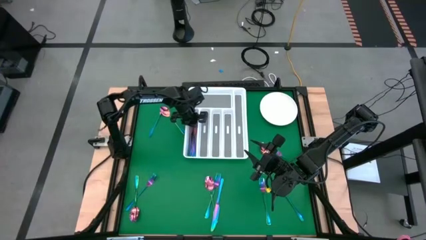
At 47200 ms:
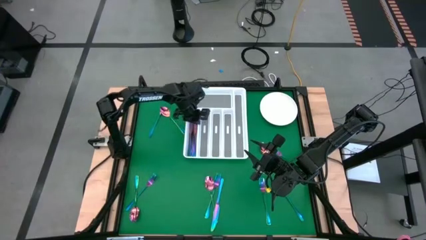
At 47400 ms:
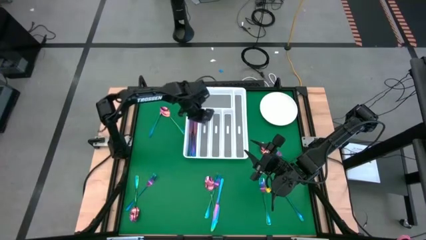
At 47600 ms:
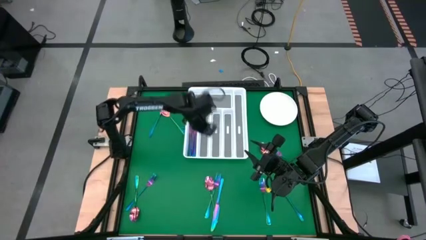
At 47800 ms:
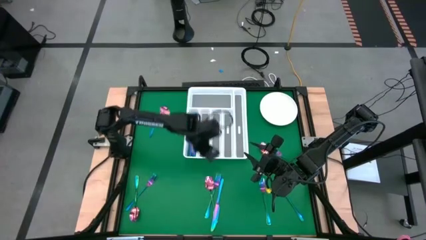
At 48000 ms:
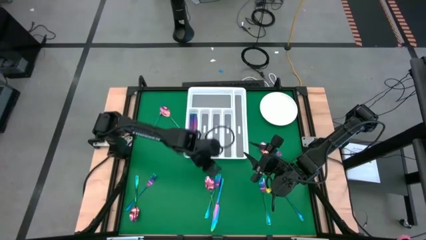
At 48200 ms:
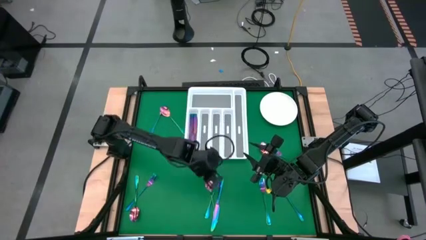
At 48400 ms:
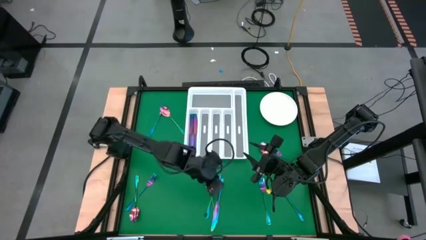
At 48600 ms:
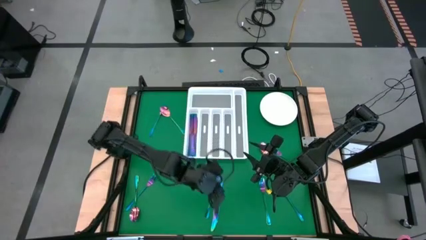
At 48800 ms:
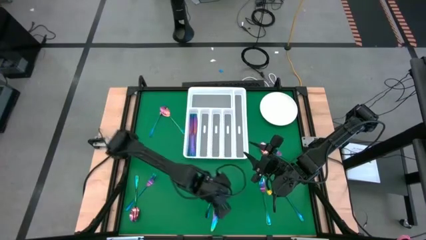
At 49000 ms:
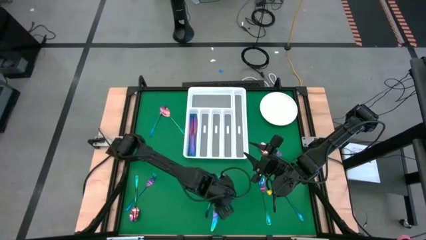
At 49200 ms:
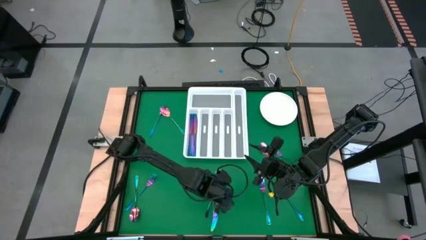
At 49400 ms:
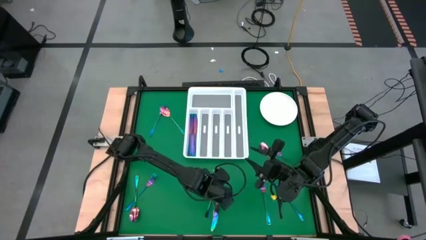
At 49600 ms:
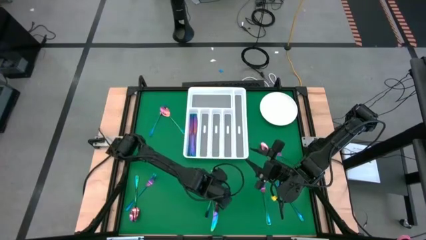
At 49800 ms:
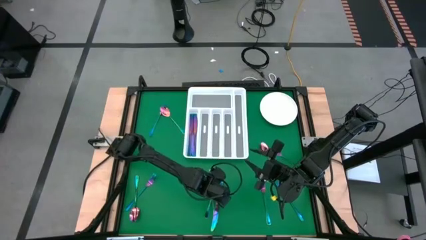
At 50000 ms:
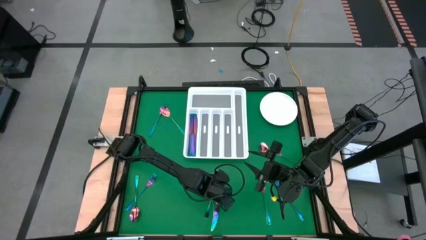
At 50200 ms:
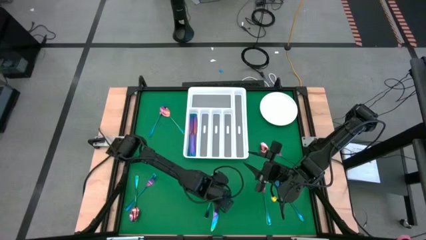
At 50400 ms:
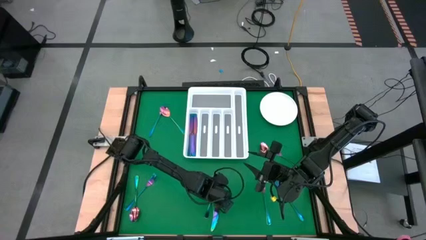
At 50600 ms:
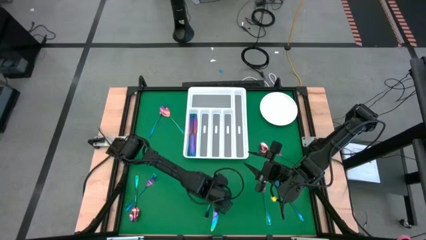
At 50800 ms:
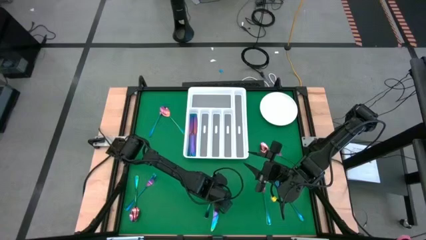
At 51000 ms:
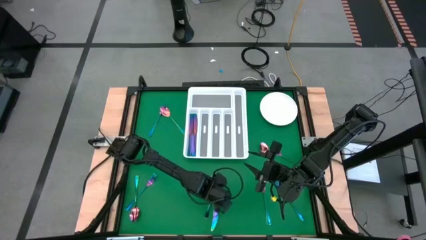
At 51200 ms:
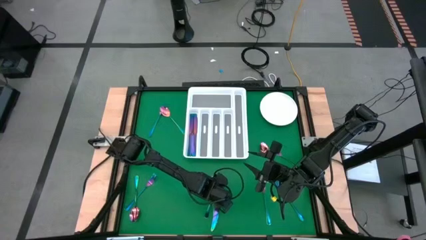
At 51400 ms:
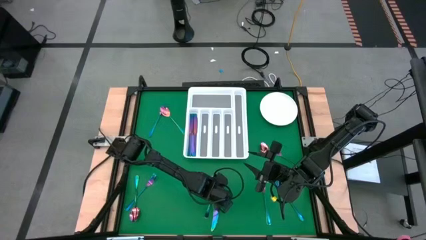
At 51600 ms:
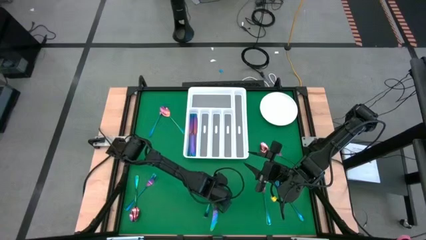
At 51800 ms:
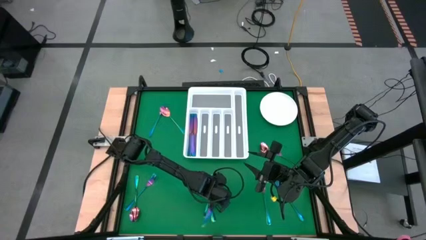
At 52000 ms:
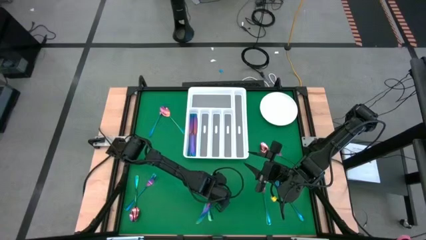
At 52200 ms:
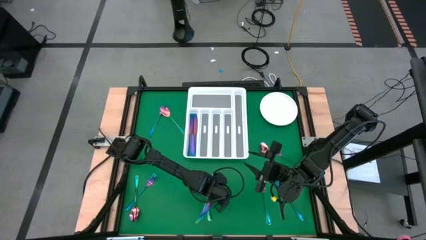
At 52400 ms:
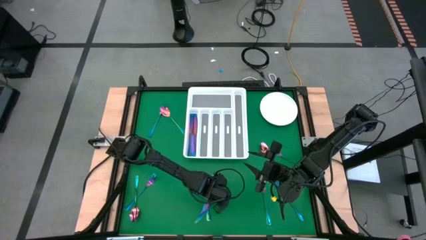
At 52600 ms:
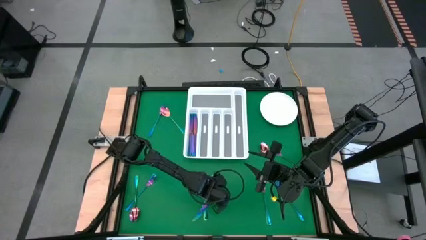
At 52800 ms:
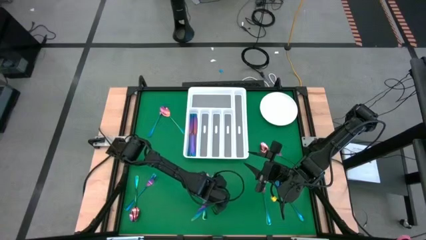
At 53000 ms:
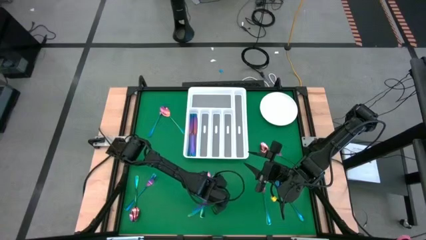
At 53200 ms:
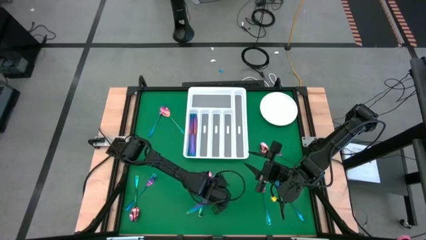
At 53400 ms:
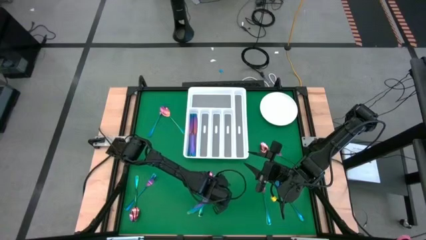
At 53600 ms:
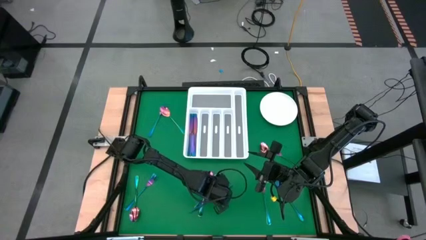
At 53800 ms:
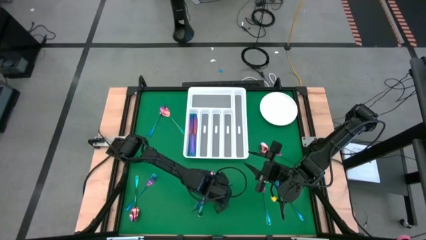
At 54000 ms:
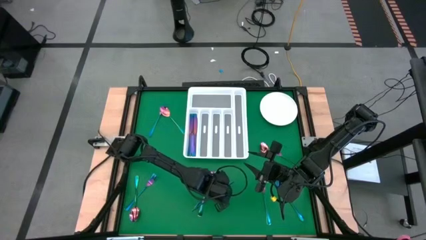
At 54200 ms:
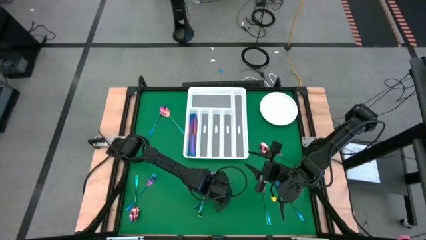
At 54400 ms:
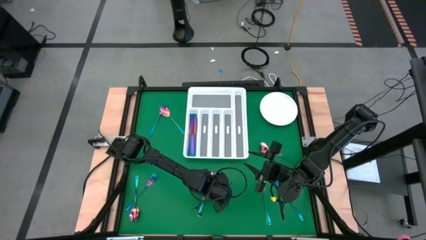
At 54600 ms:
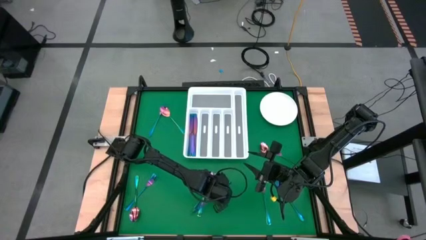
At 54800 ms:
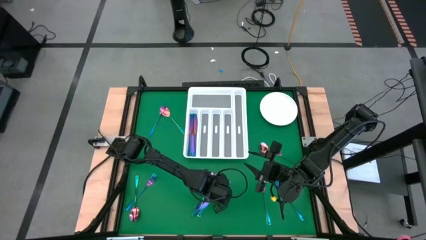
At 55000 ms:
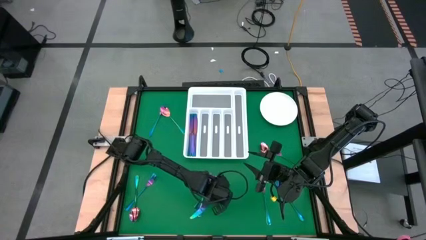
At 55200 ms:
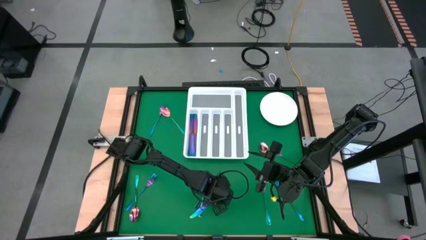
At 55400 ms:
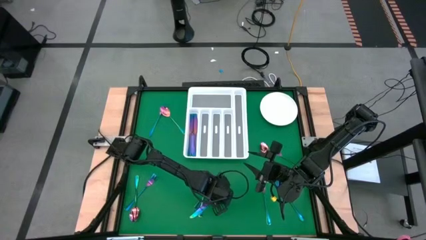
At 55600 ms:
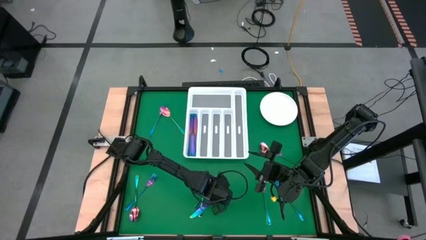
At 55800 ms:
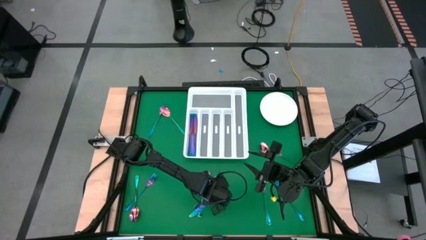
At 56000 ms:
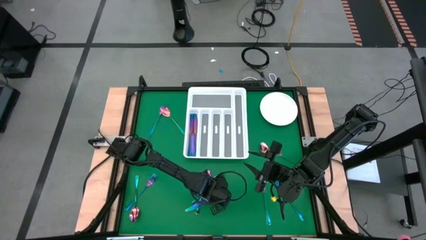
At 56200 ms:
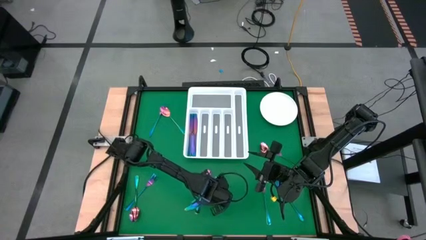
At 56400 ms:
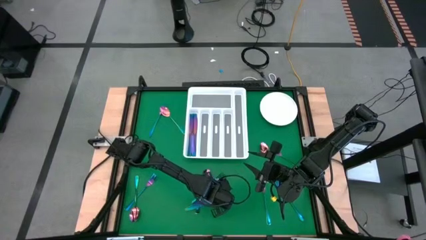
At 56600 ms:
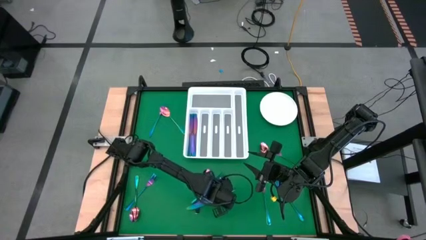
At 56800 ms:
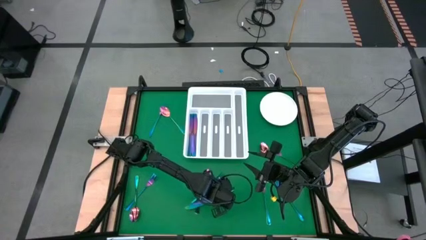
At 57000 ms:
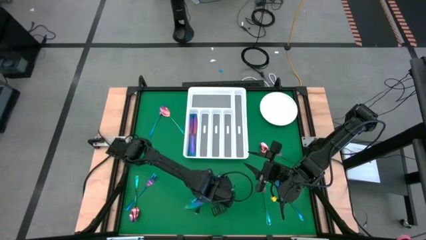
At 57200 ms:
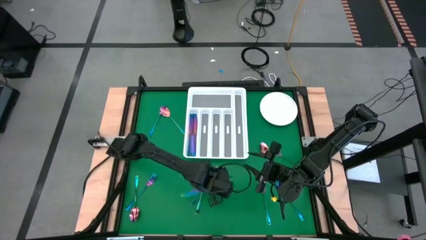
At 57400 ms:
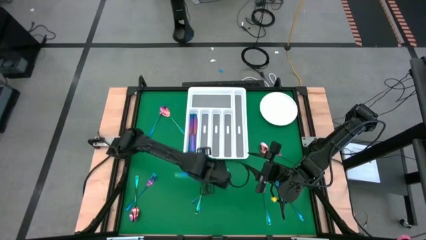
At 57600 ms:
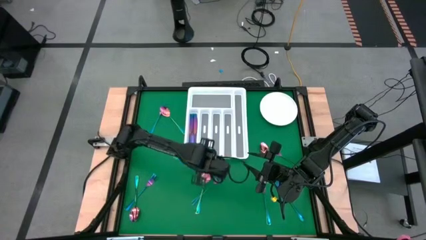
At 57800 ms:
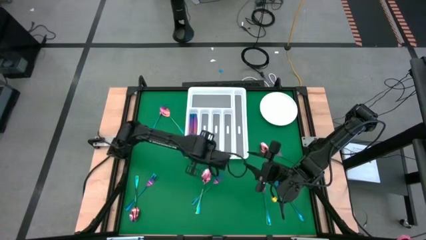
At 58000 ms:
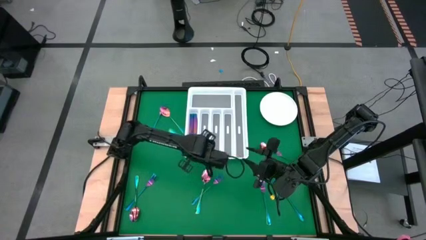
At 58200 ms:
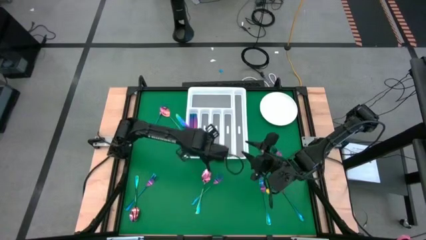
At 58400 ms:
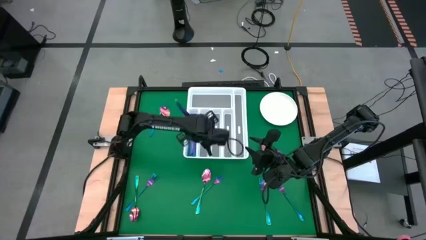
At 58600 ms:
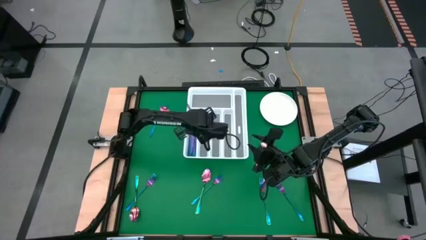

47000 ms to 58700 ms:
Task: Sort silverware
Put the blue table knife into the silverware tray

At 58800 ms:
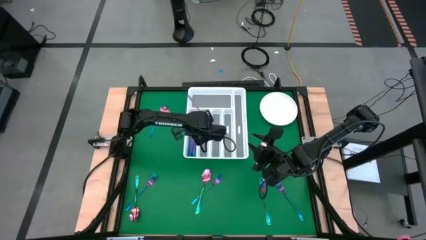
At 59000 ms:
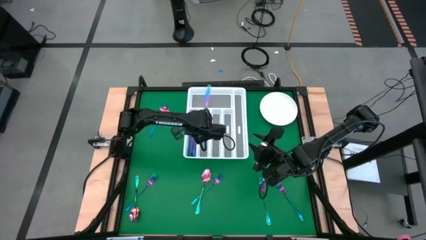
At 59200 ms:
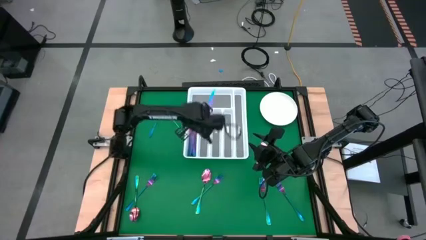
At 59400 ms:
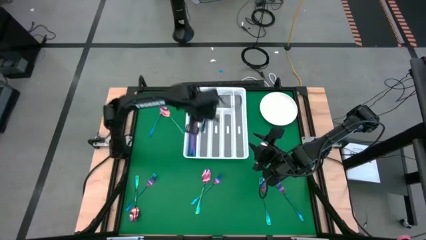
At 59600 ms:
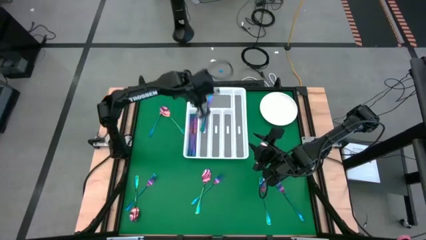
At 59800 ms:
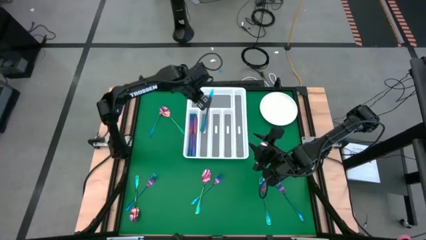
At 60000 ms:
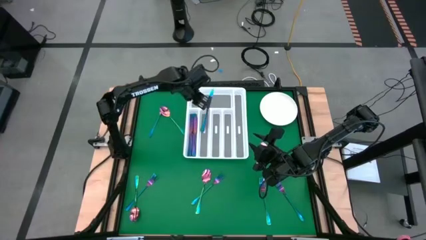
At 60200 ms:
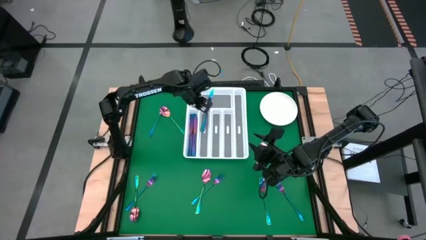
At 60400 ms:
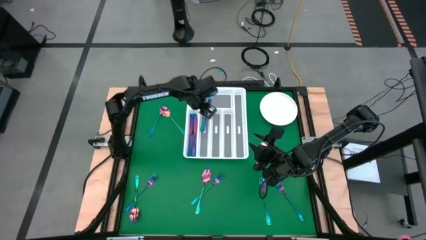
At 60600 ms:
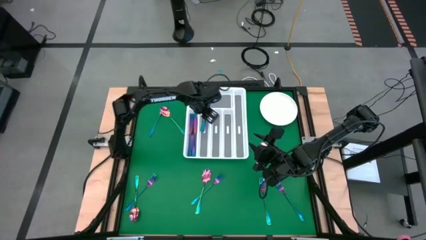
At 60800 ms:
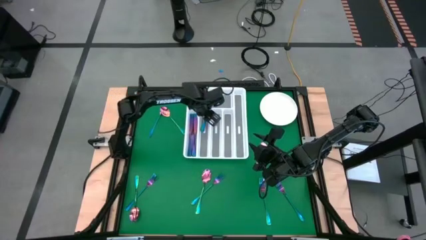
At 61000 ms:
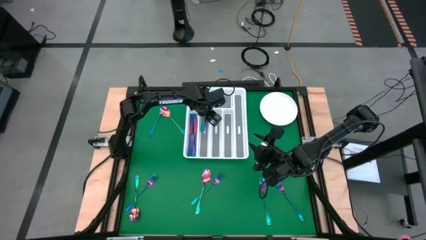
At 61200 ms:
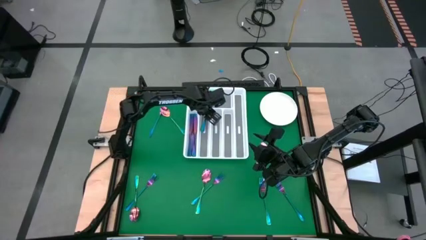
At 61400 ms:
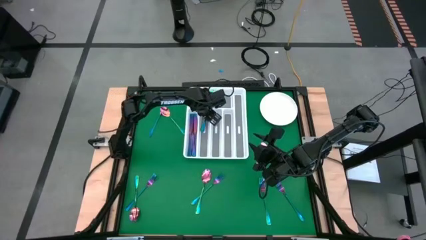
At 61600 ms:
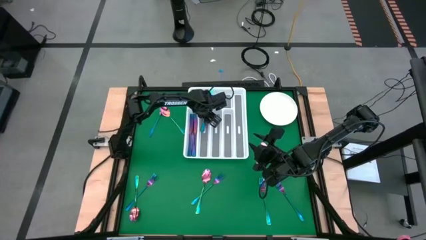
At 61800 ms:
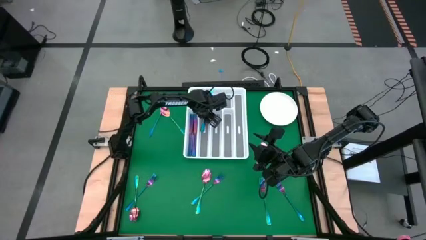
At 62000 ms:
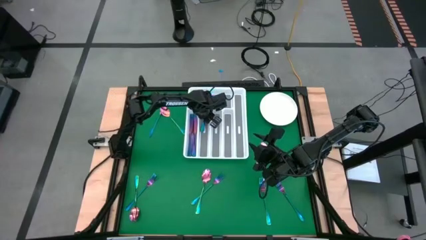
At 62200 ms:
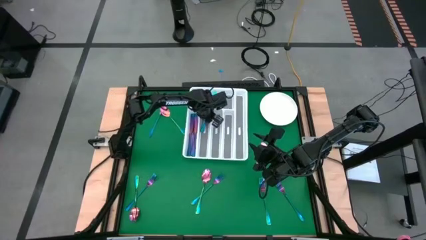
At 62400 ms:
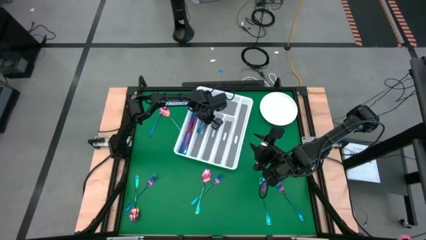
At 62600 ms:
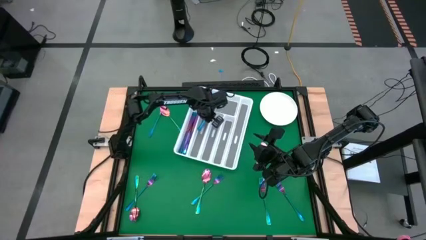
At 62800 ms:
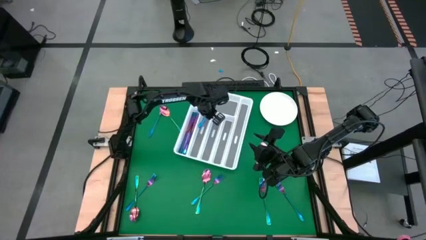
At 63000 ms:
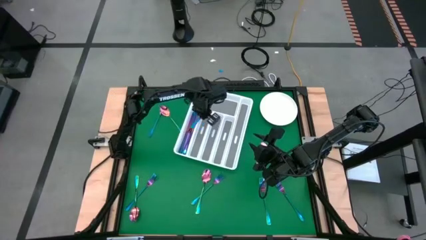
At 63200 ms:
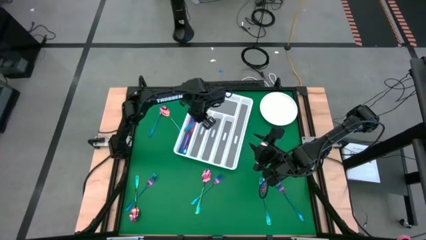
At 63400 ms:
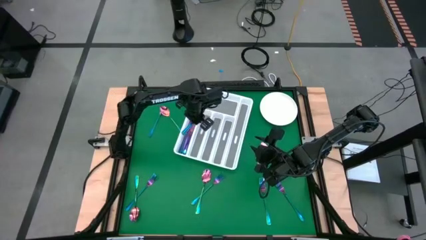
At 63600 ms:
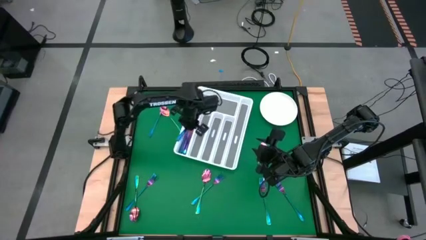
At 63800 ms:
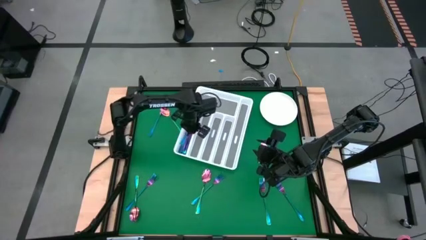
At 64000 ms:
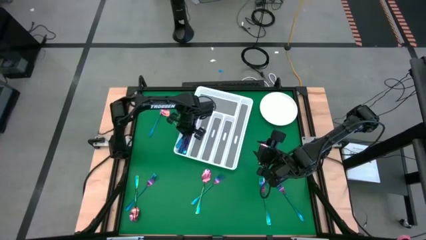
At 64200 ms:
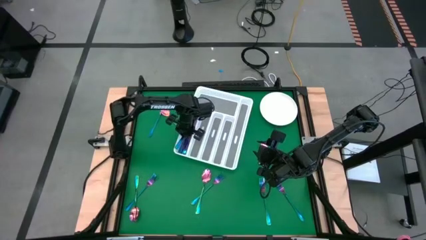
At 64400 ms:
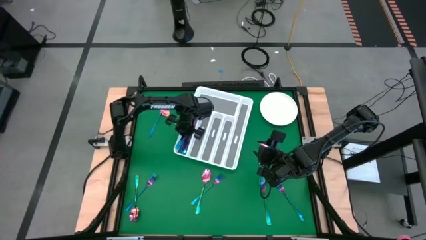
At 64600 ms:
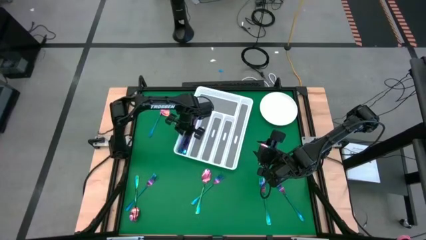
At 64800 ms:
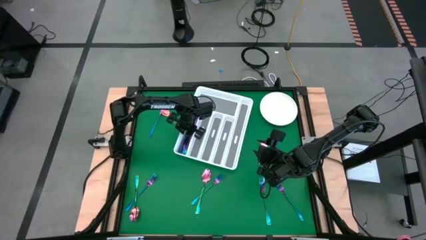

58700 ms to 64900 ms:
Put the blue table knife into the silverware tray
